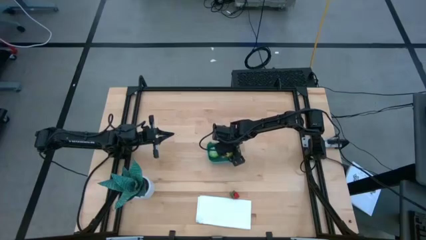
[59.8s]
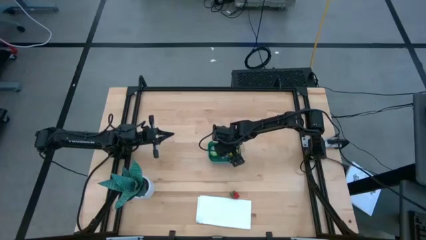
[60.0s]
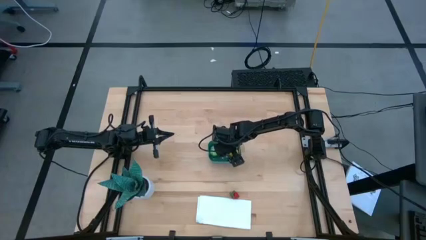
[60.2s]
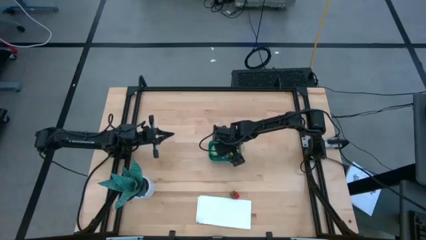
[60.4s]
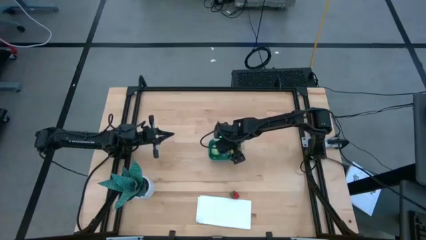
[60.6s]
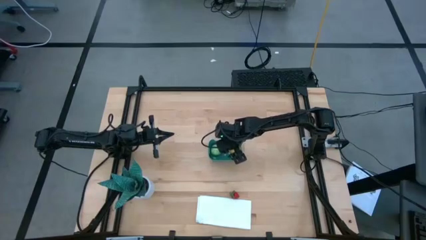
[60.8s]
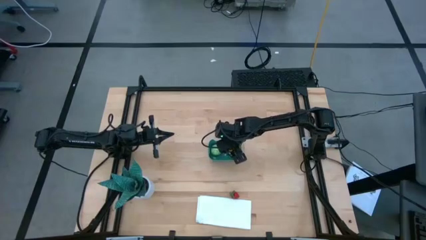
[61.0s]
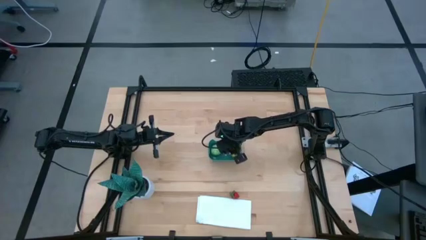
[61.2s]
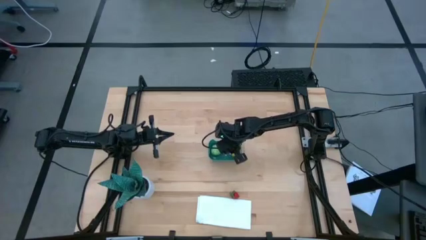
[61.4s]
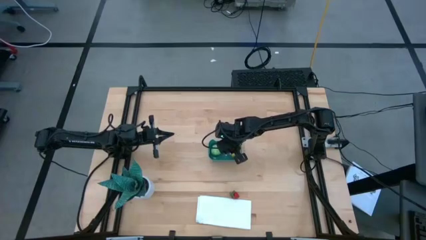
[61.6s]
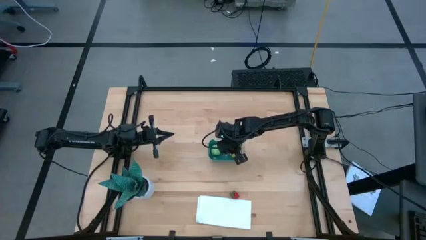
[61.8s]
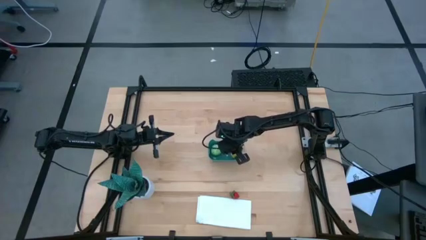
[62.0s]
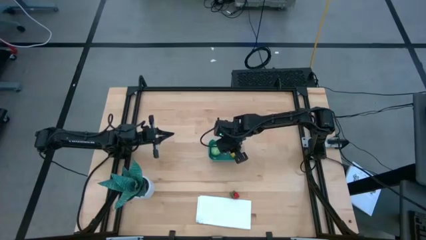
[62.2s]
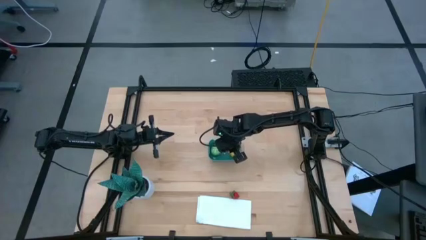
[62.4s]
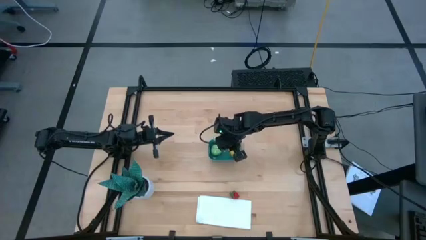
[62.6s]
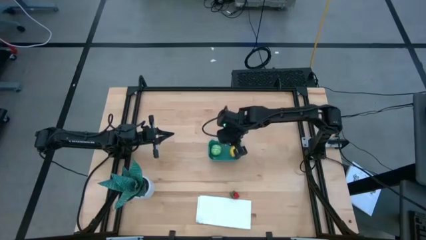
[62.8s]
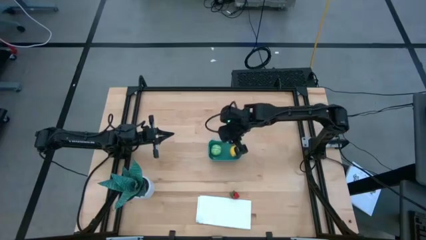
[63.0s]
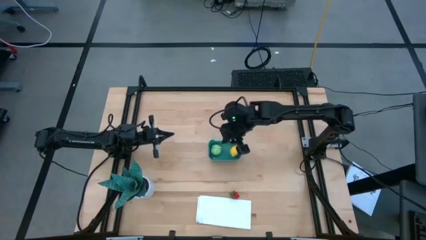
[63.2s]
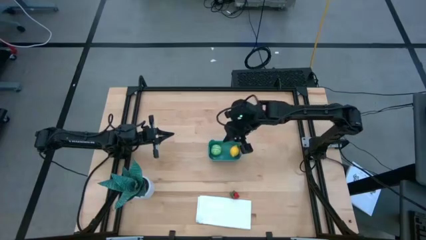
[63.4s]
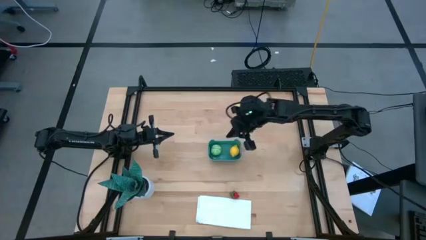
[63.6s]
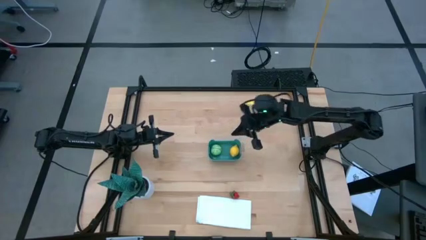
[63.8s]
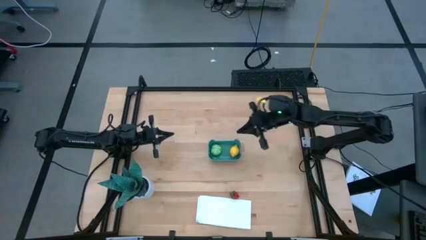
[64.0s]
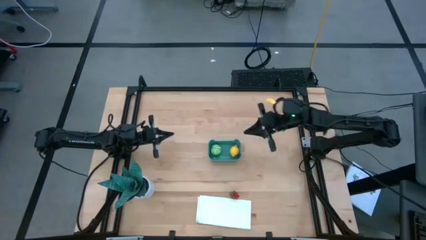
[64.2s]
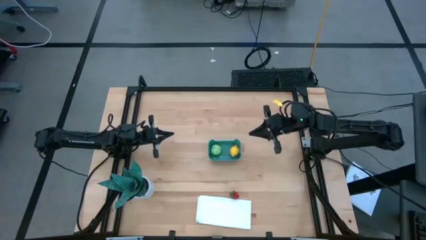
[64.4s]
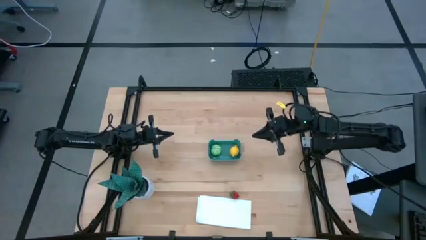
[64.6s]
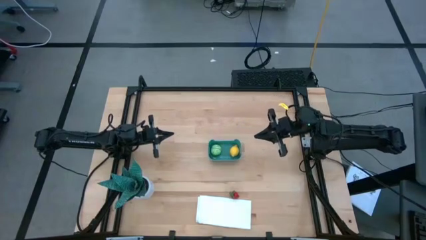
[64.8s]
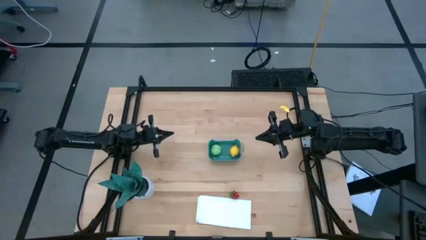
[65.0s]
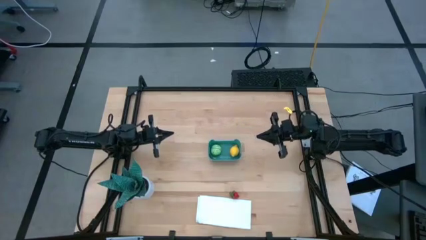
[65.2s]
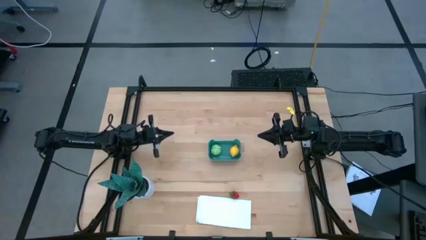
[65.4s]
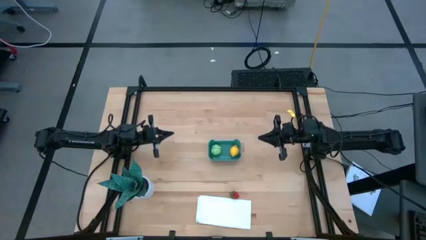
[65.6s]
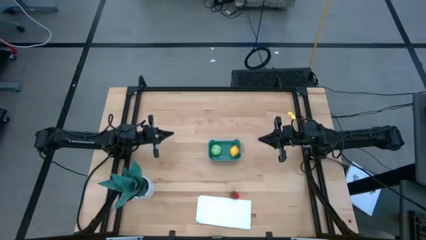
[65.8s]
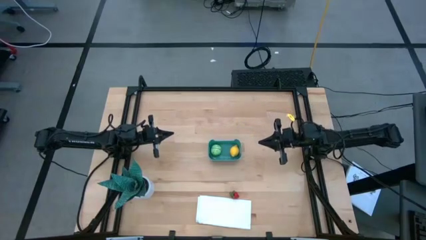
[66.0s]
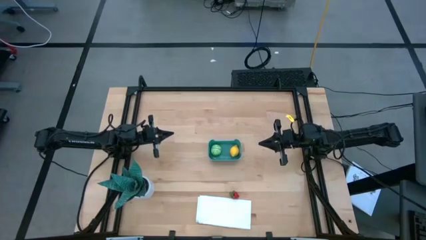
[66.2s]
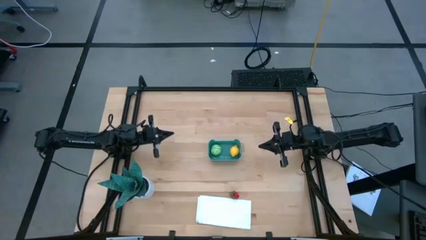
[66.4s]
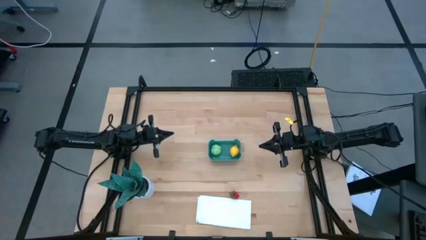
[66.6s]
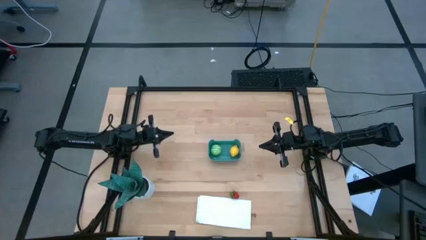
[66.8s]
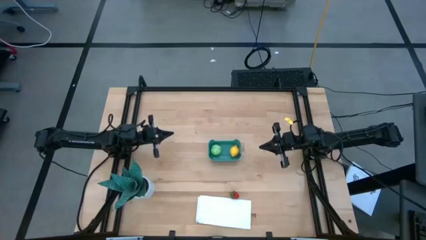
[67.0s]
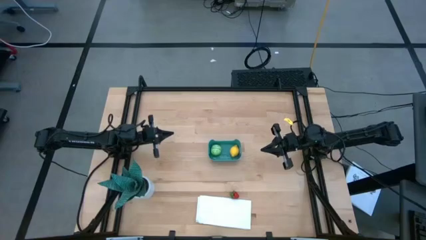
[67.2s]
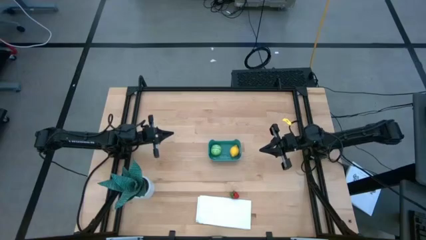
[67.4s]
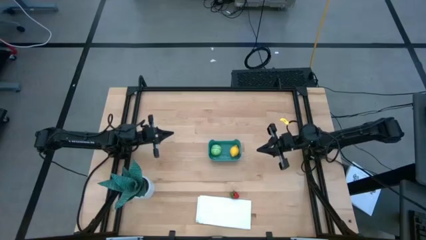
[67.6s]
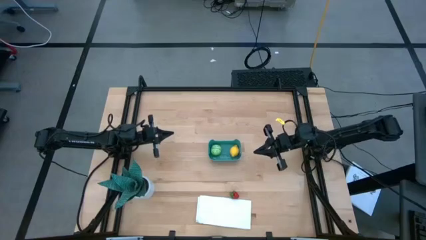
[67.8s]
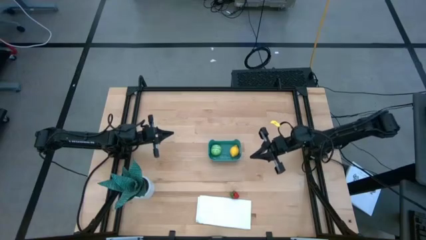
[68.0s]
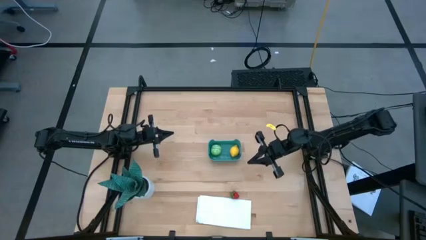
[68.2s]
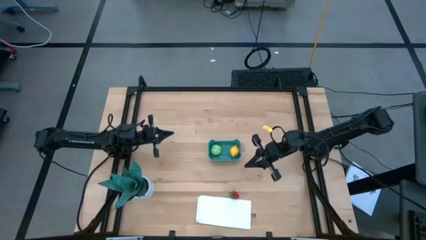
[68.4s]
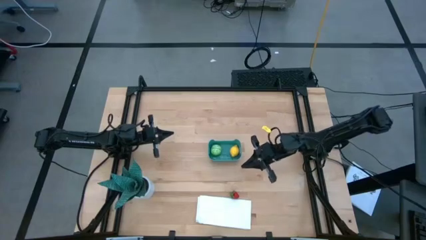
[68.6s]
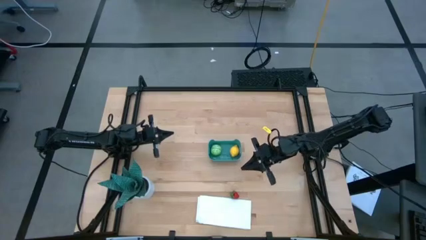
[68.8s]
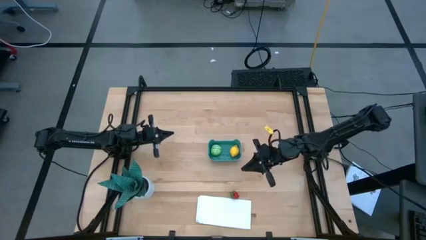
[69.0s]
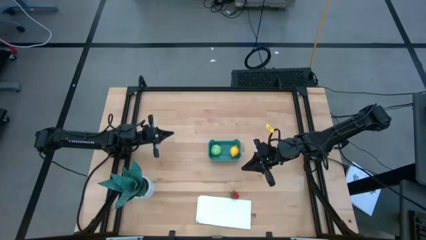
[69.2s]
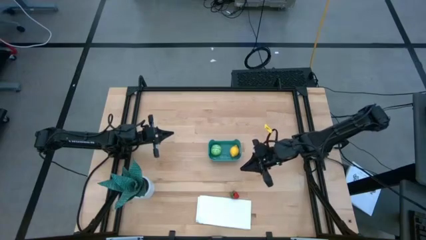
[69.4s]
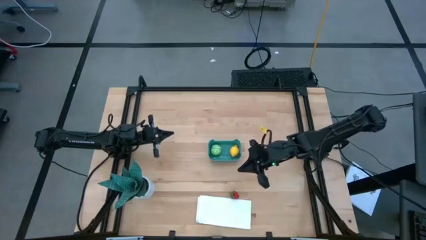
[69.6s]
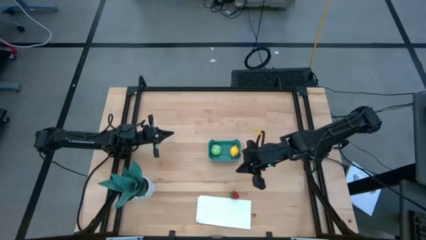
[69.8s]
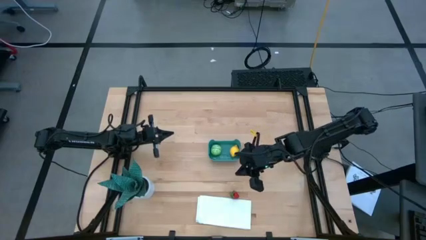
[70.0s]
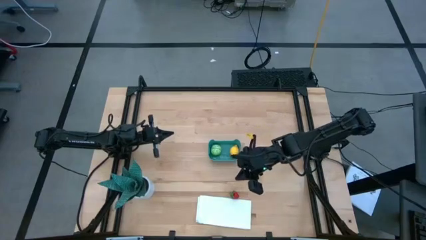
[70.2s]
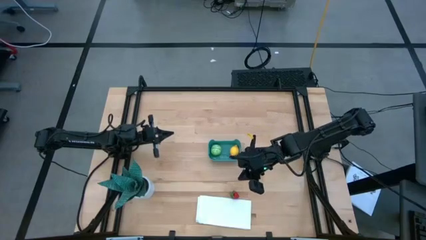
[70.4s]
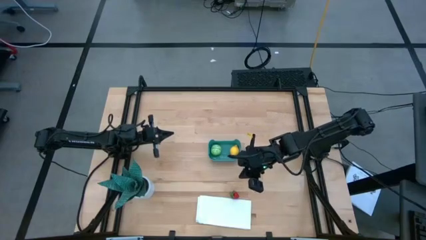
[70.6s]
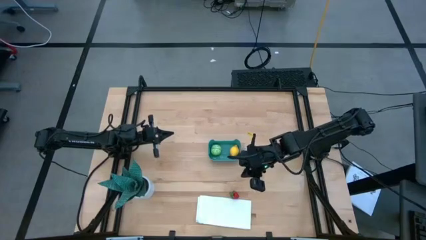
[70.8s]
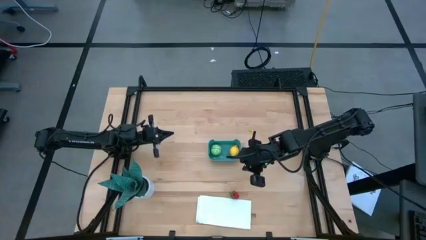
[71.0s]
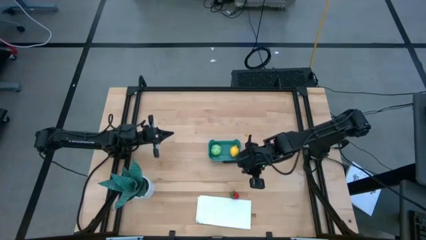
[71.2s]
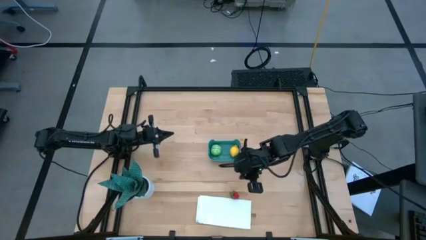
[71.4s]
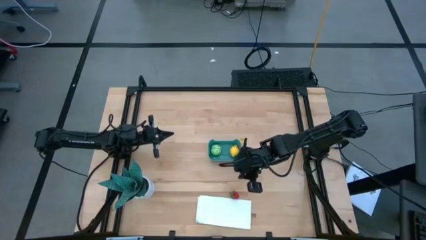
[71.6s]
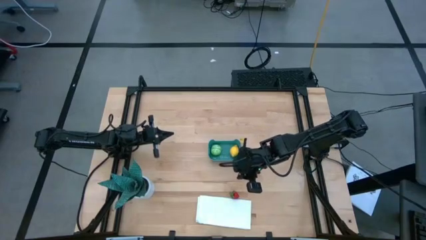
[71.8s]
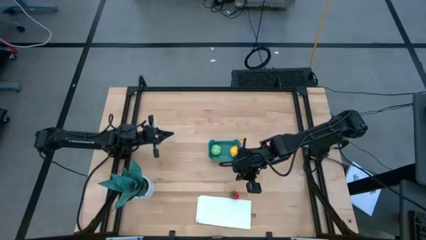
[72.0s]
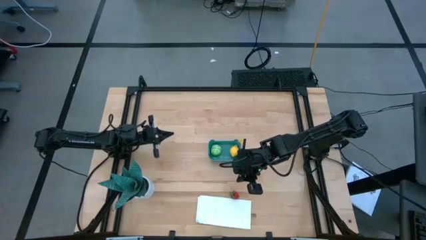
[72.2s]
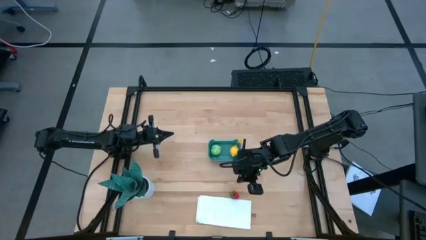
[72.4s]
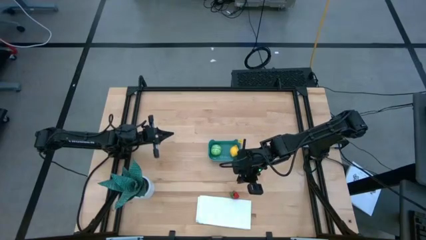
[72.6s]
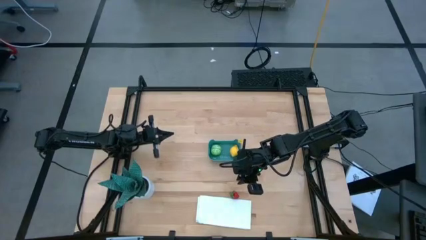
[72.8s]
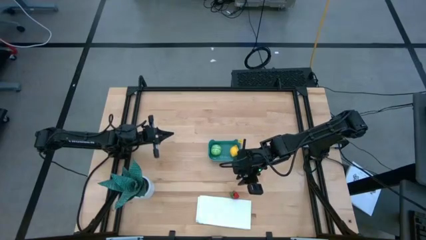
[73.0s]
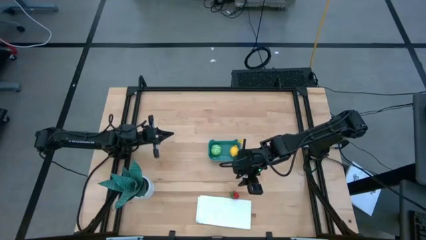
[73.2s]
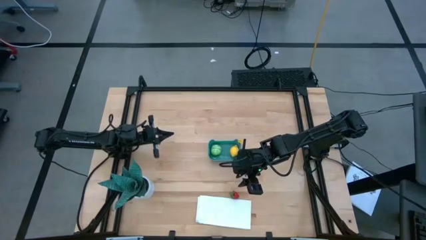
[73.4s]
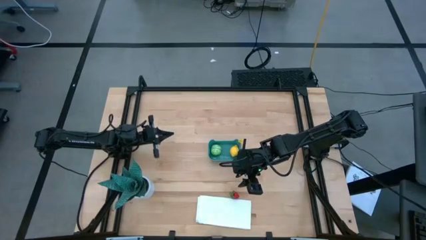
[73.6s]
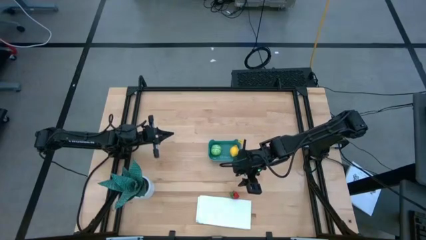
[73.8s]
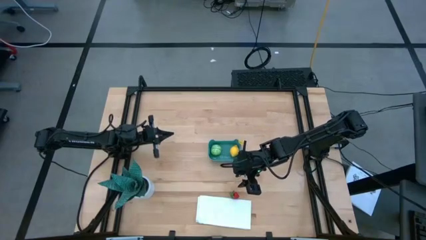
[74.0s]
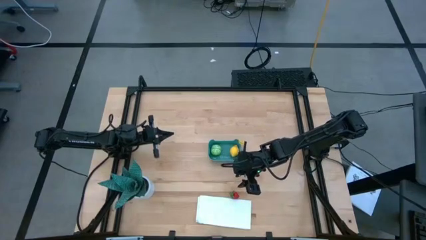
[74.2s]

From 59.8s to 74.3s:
Task: Pick and placing Produce into tupperware
Put the strawberry into the green bin

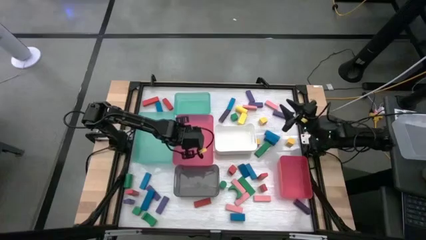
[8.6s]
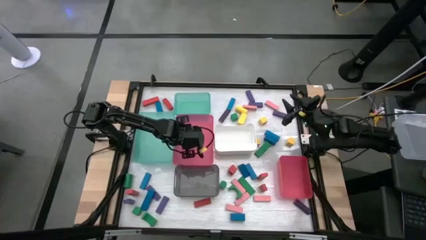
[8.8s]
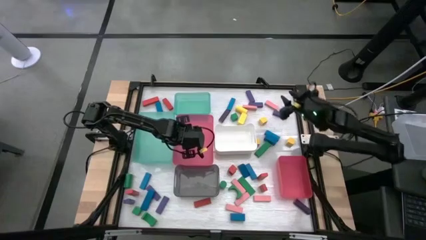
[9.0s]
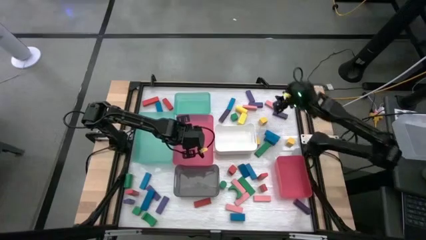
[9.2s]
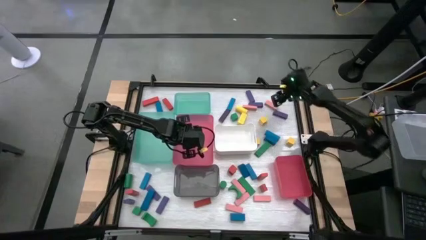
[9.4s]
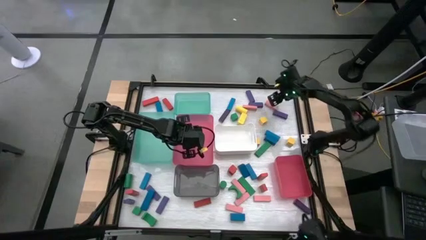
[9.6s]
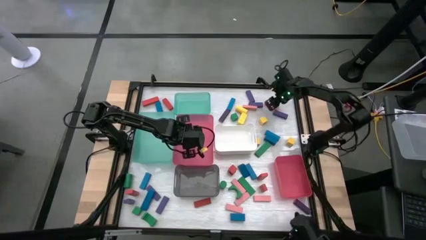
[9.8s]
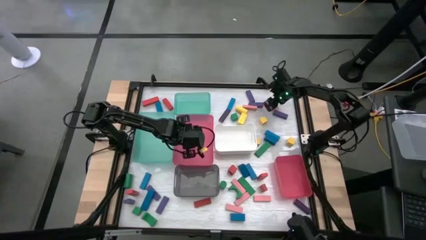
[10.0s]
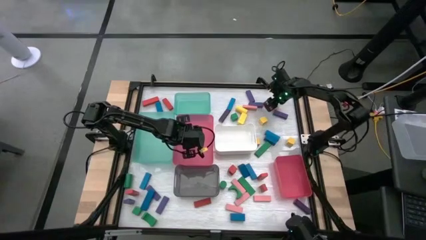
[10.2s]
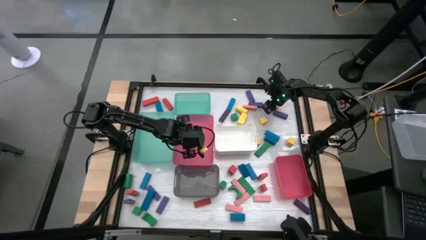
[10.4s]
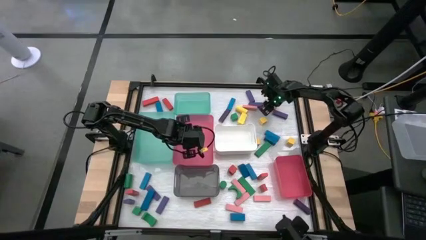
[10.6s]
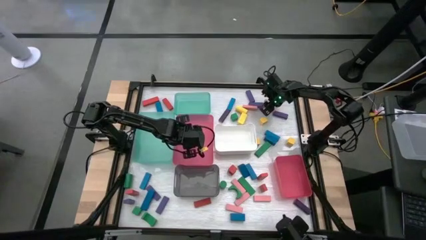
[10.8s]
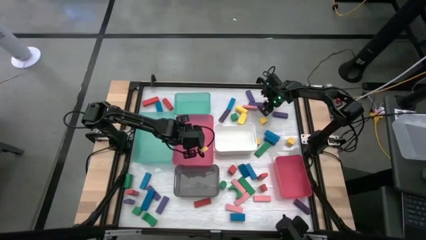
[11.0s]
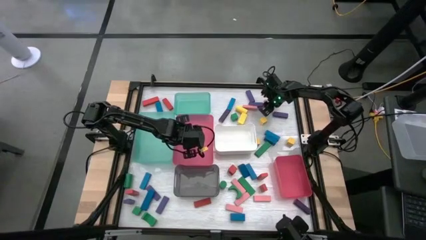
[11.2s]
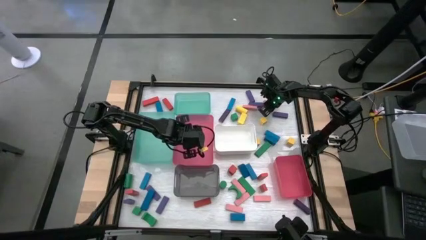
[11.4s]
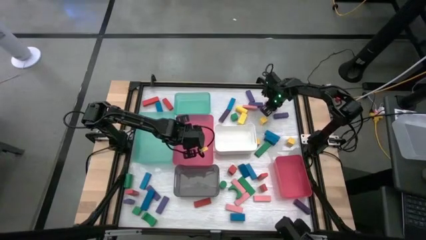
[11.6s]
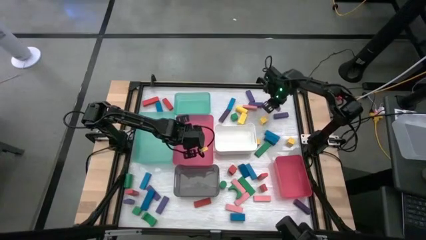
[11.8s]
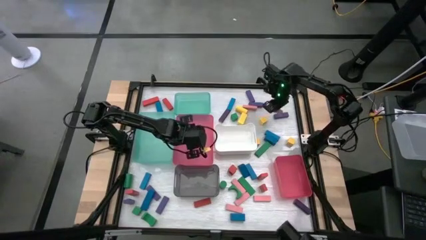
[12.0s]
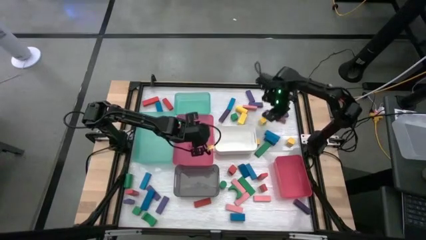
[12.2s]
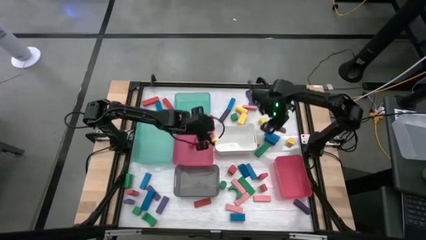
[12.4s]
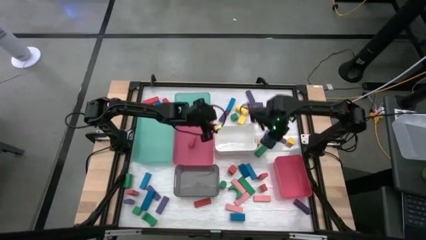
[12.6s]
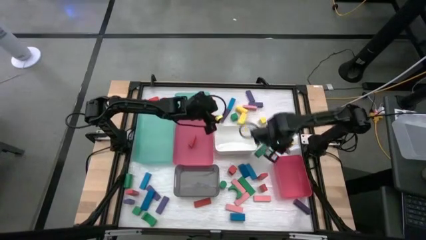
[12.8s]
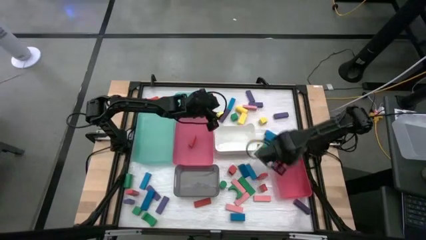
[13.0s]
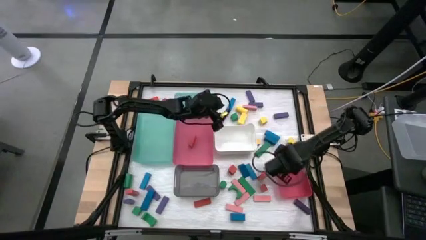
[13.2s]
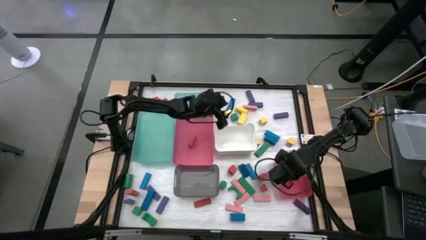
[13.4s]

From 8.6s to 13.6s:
Task: Sort blocks
Put the pink block into the bottom pink bin
